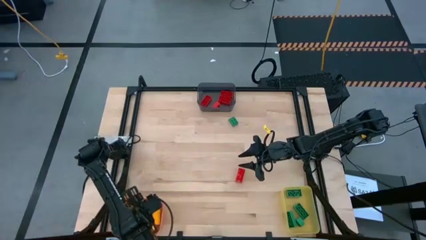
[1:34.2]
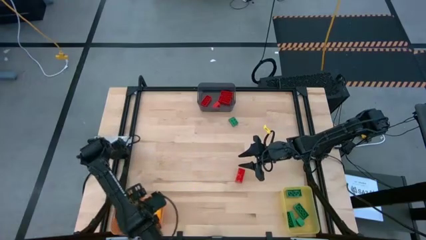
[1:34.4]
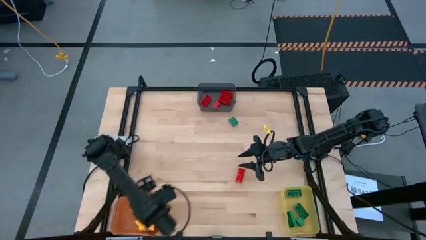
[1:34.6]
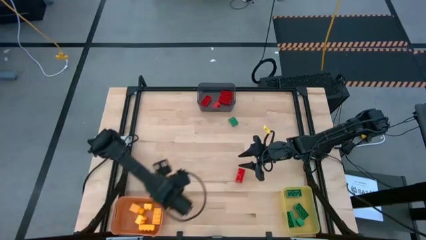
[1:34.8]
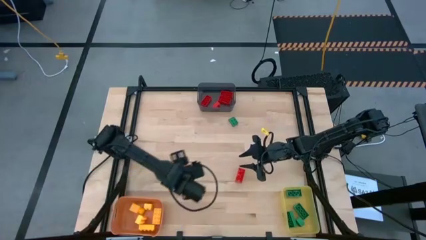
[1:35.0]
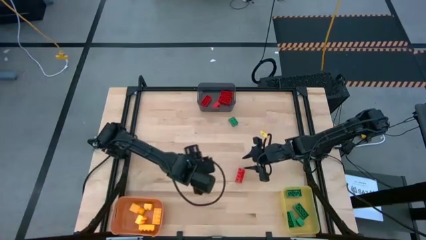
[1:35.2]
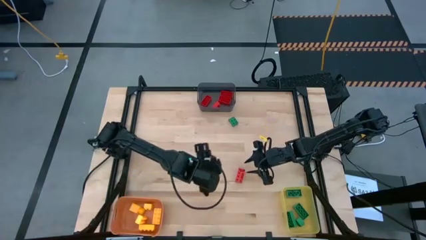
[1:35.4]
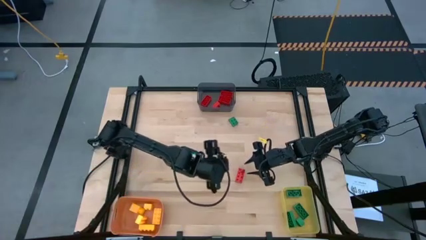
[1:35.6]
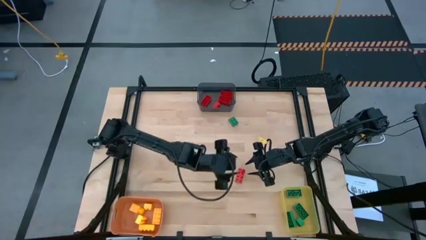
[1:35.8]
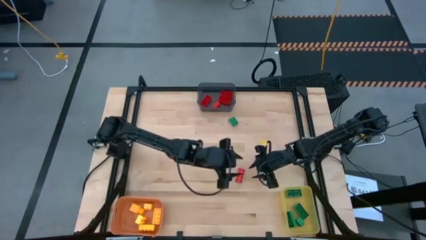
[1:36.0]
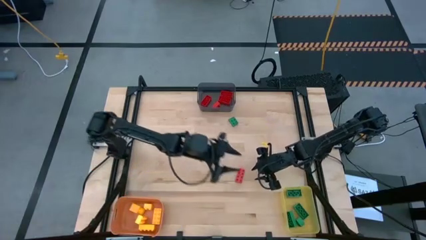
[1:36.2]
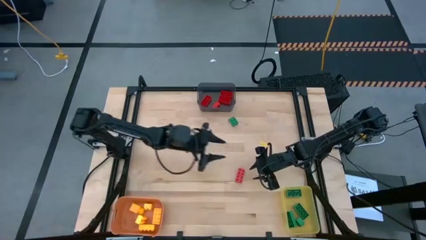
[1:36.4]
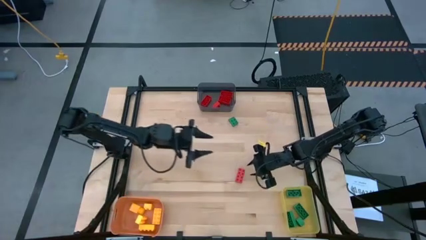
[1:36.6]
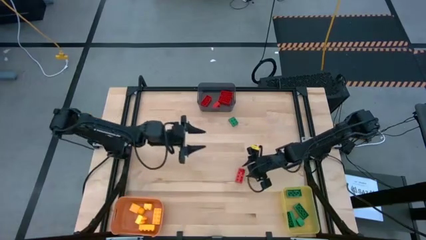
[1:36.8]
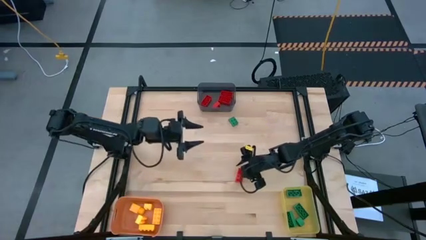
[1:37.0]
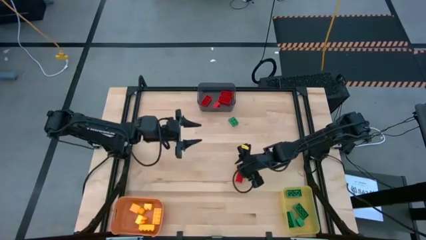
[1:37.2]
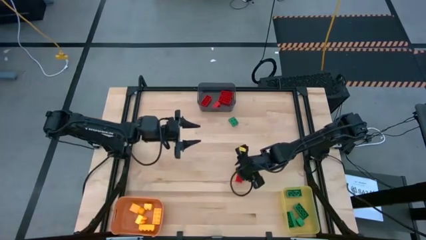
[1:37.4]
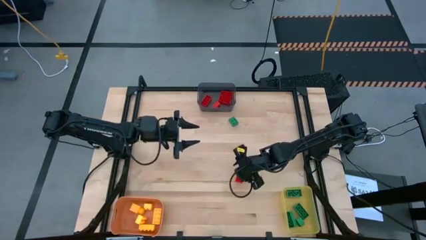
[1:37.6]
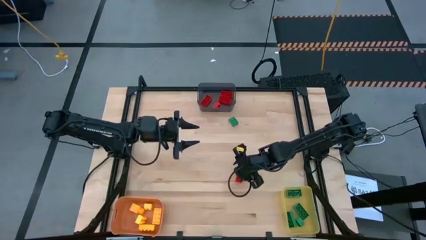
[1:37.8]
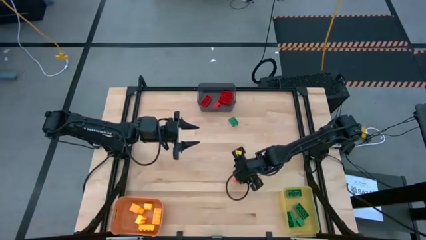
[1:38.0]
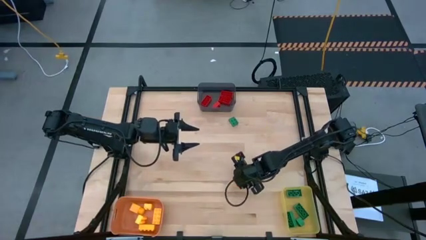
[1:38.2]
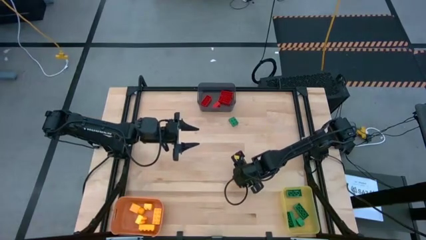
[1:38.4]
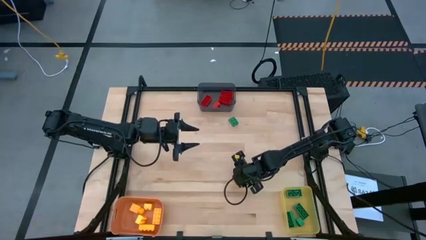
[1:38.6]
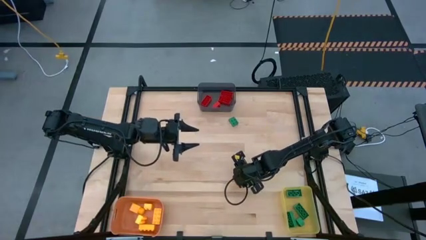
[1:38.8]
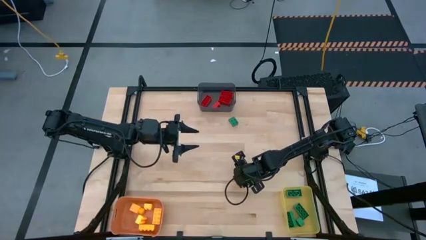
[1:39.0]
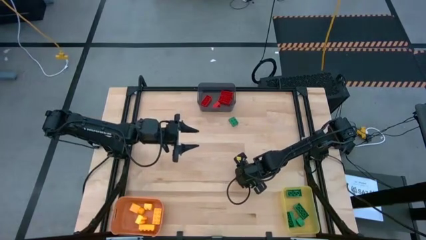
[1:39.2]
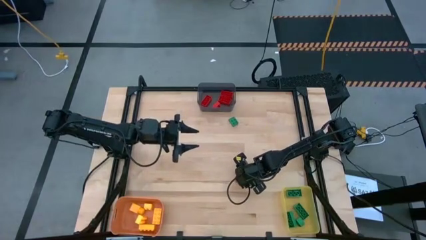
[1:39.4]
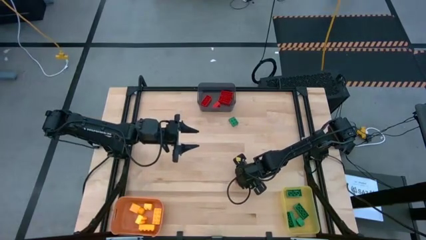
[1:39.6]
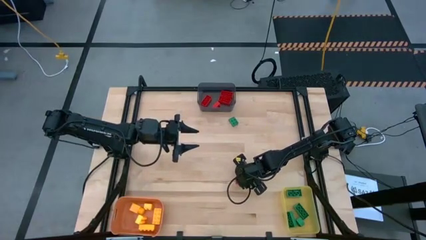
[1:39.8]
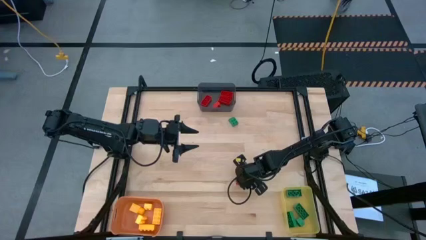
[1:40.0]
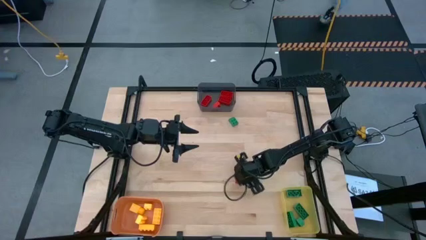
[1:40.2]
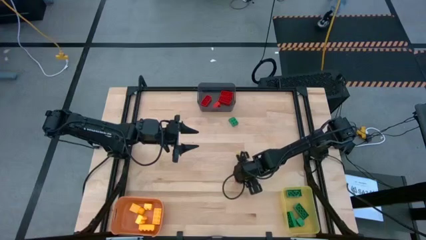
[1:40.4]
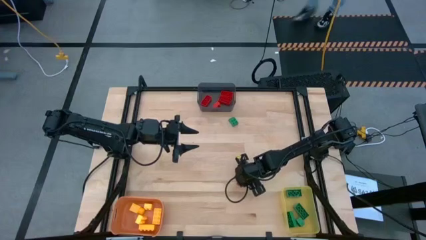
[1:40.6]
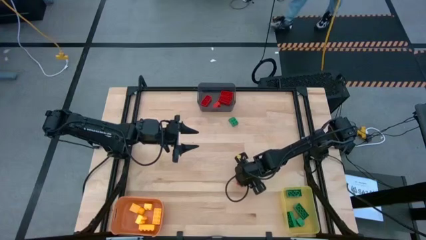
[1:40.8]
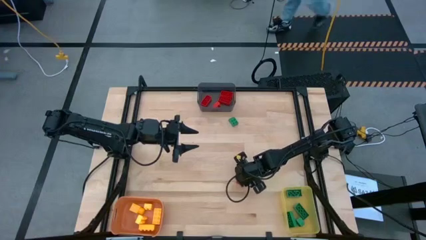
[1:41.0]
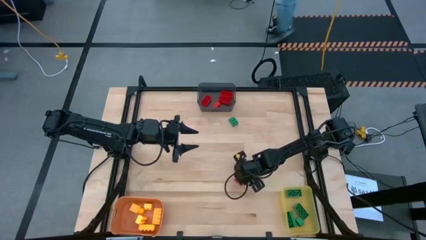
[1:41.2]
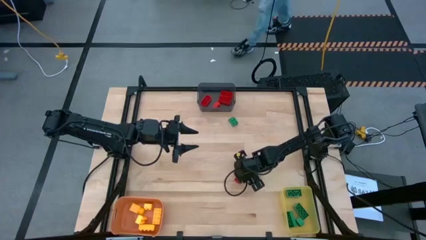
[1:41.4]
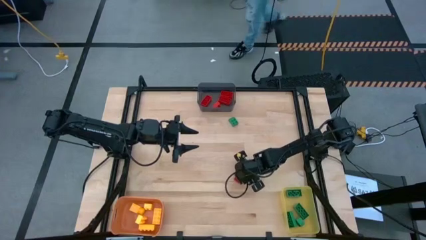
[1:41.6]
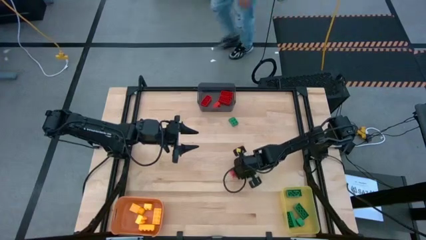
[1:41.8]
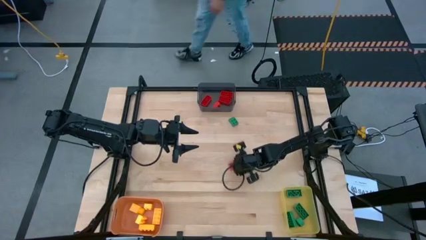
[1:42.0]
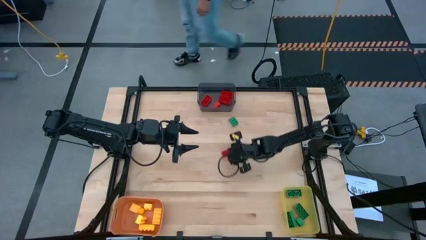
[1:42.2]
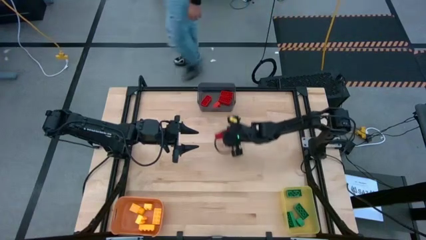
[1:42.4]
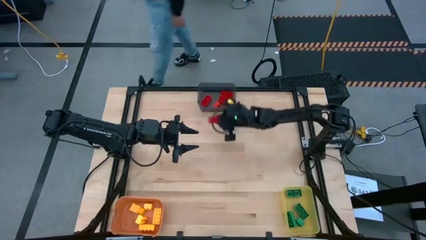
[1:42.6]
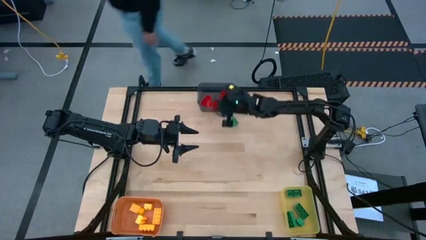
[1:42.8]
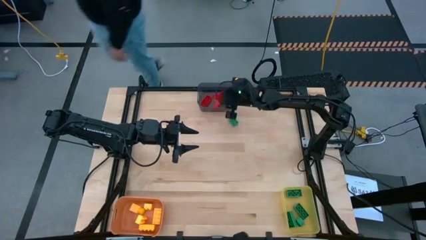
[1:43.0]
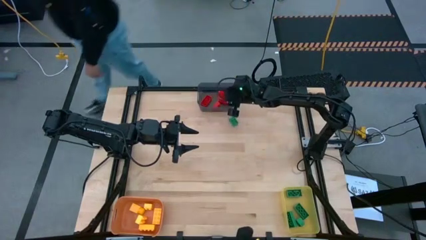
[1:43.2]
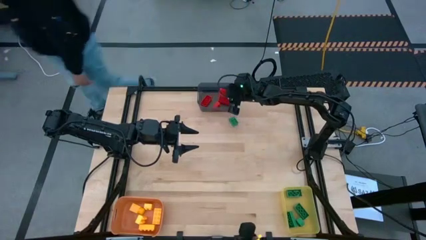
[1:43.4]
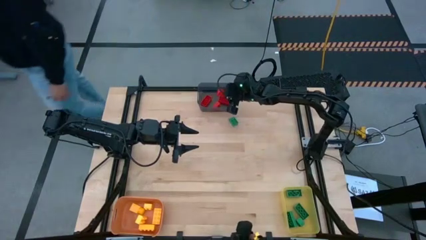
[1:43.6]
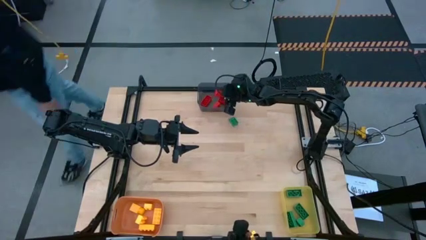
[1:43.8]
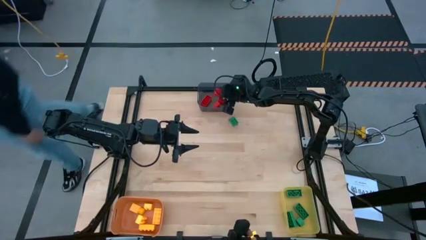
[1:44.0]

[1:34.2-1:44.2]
Task: Sort & place blocks by color
Put the red game piece into the black bin

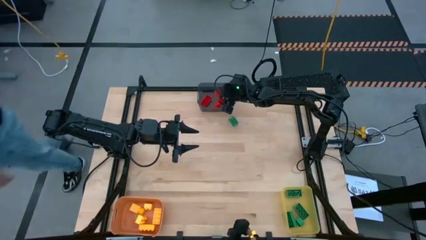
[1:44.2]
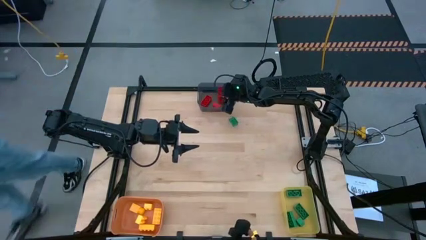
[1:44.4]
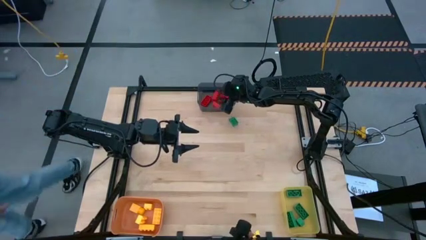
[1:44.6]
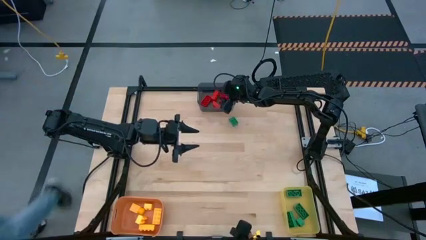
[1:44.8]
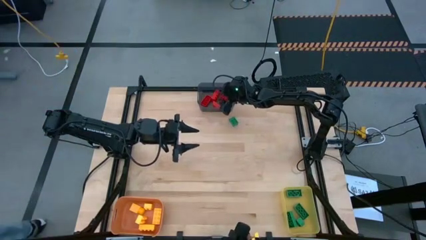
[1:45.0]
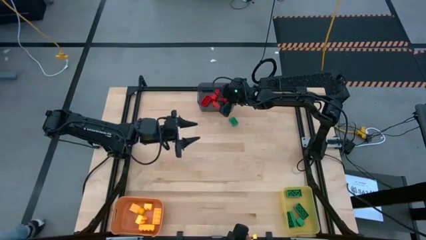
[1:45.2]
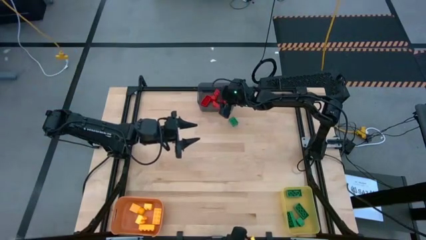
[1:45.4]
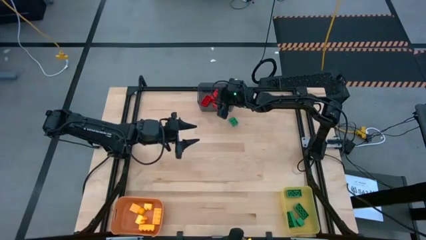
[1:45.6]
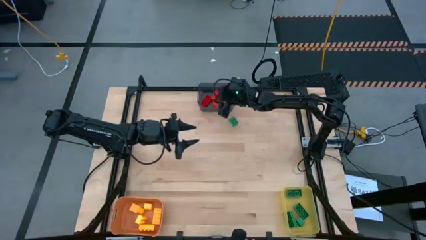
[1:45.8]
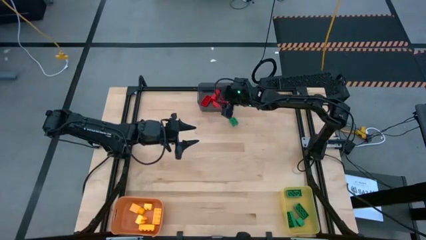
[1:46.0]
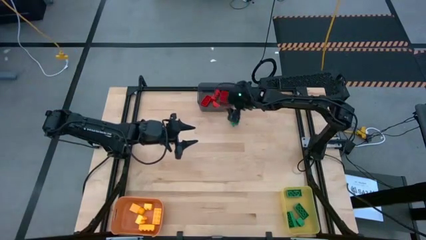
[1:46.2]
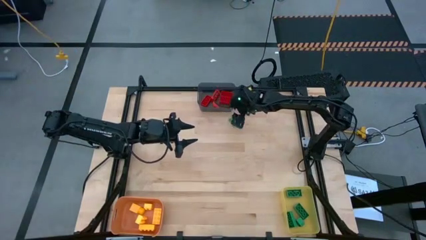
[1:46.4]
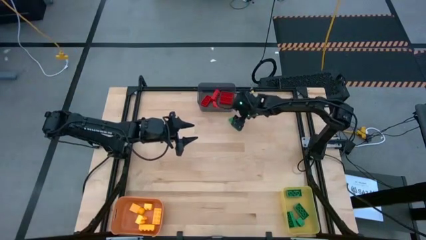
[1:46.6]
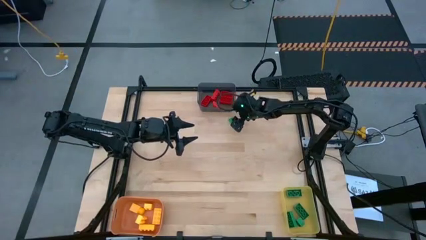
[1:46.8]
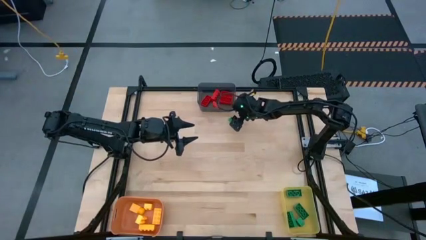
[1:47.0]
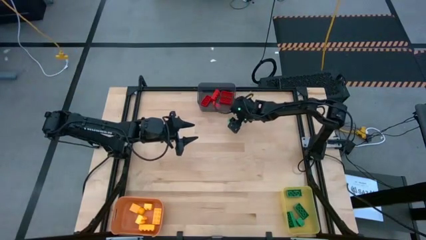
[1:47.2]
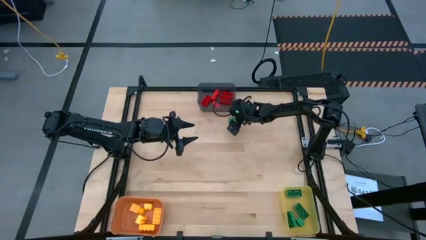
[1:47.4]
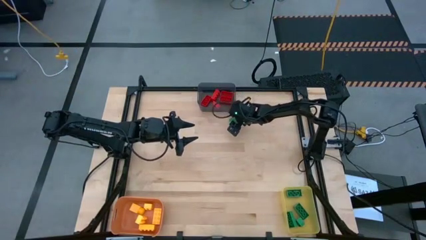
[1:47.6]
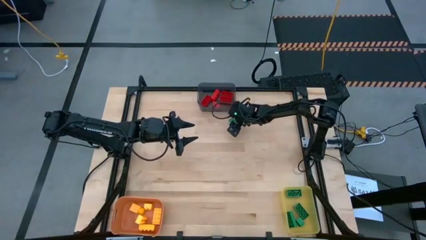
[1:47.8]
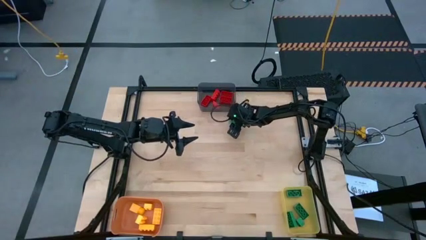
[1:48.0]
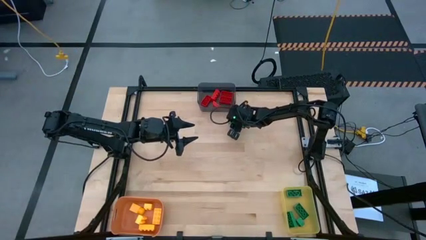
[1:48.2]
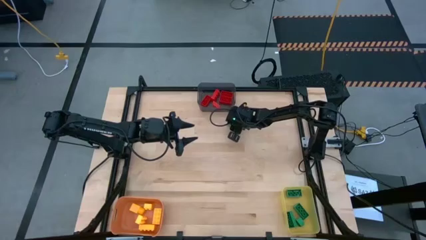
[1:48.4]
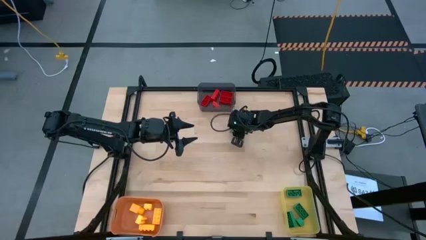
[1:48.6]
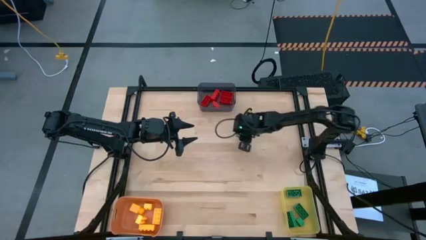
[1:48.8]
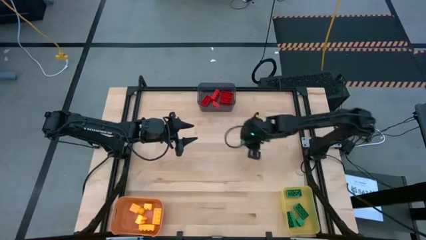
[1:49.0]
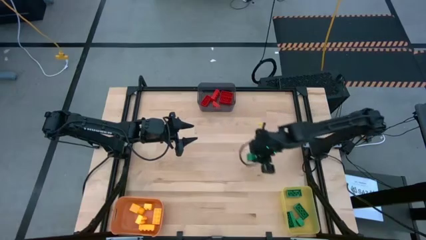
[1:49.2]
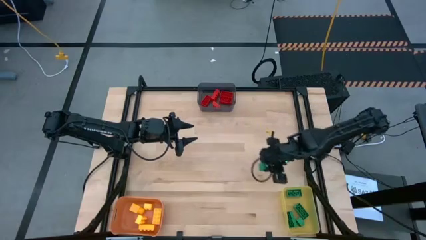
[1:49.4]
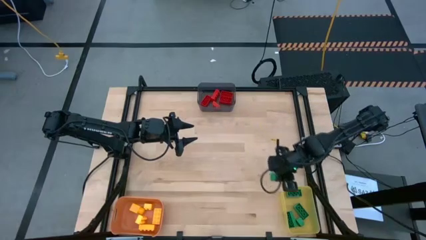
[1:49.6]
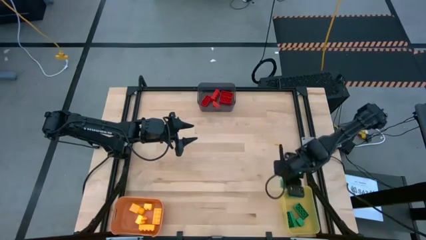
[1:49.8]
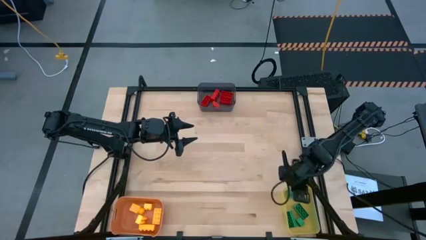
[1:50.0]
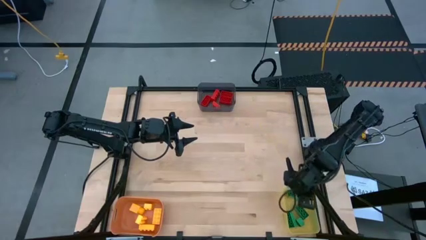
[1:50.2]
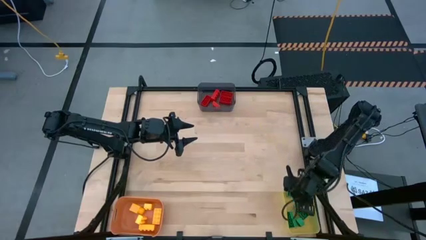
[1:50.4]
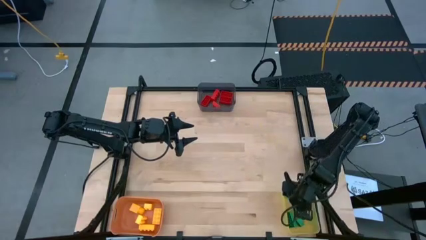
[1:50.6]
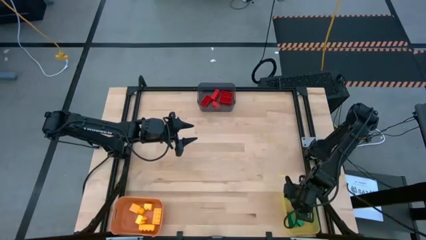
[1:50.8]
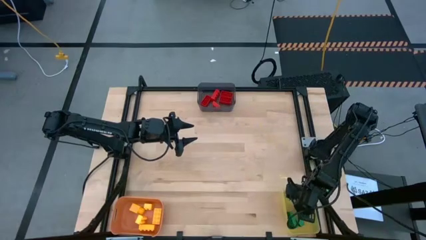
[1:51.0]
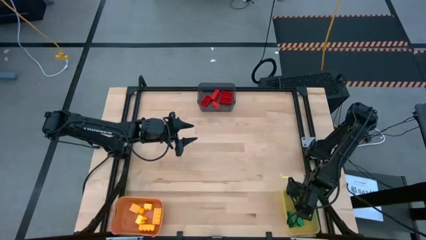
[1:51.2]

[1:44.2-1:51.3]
Put the green game piece into the yellow bin
